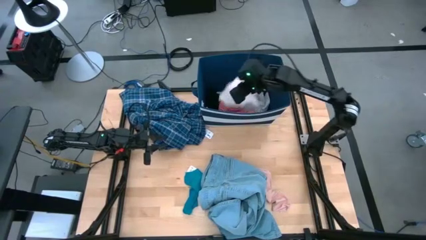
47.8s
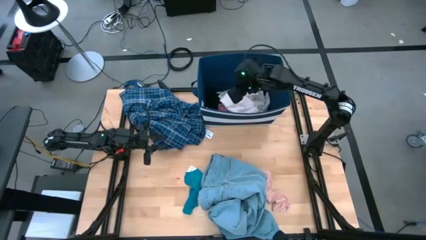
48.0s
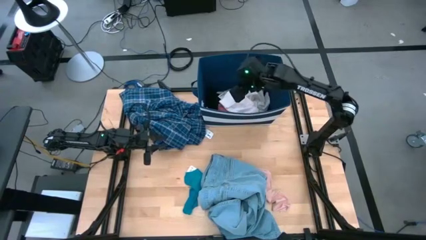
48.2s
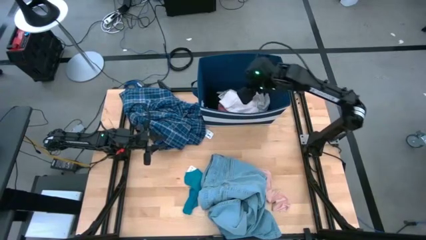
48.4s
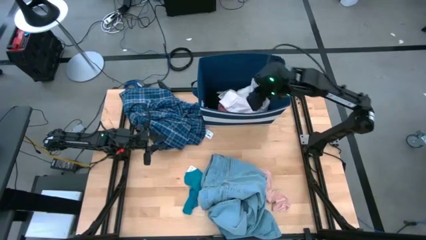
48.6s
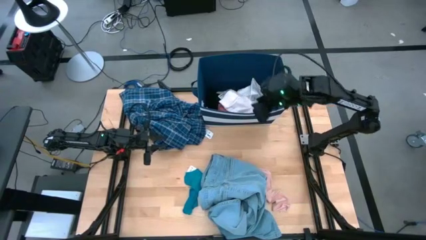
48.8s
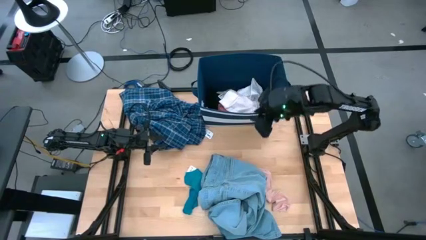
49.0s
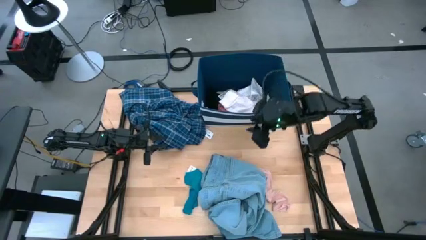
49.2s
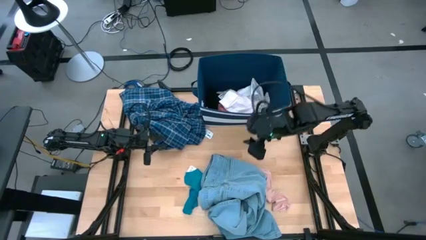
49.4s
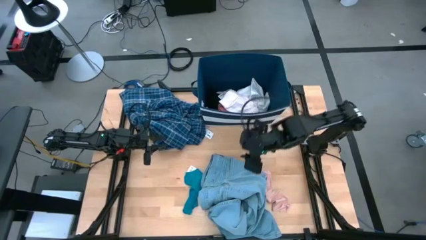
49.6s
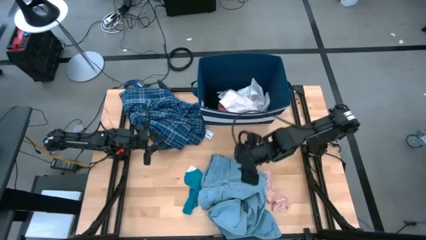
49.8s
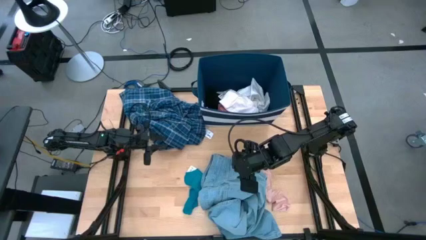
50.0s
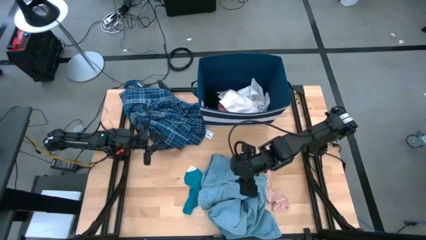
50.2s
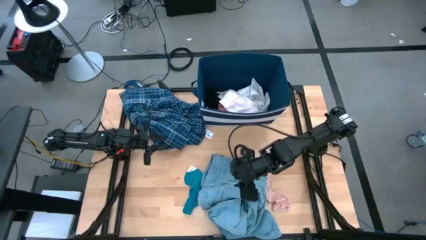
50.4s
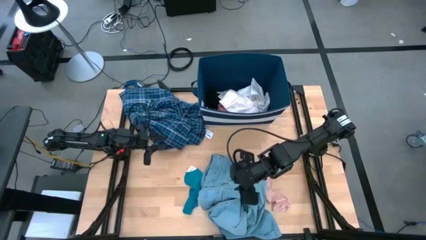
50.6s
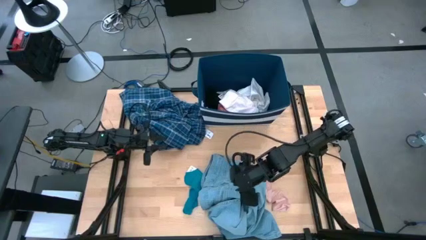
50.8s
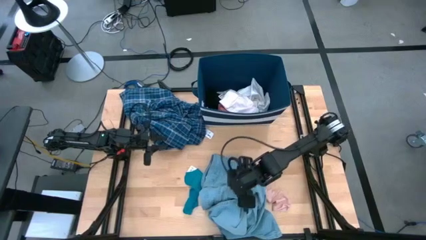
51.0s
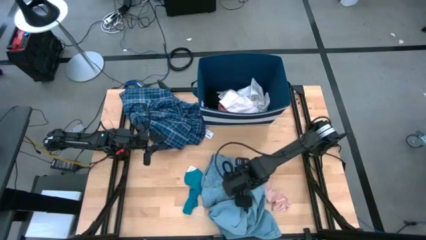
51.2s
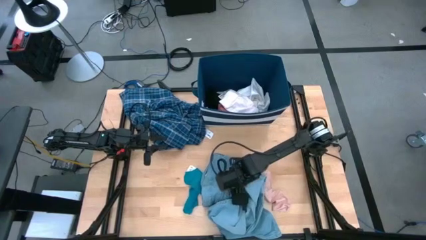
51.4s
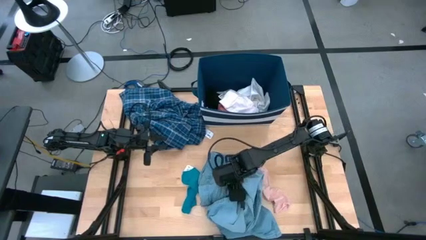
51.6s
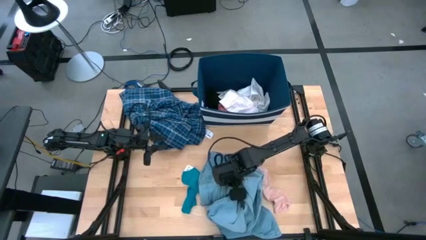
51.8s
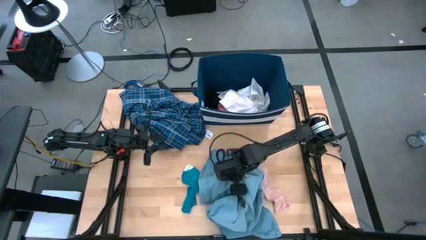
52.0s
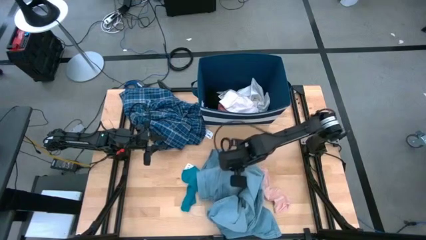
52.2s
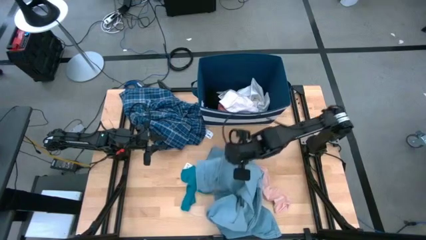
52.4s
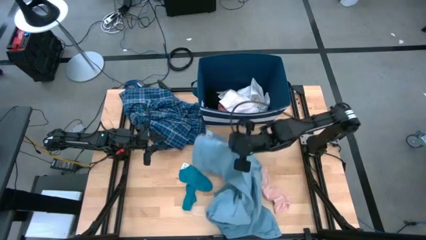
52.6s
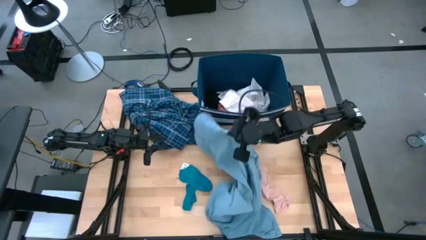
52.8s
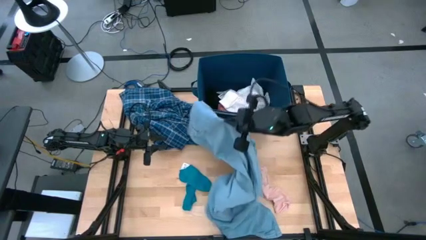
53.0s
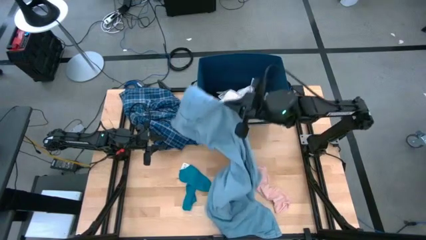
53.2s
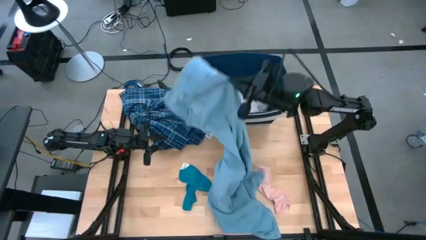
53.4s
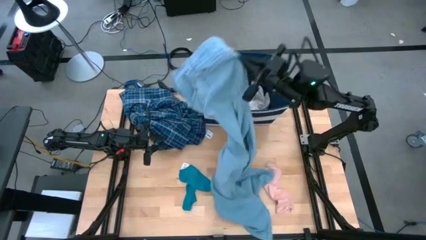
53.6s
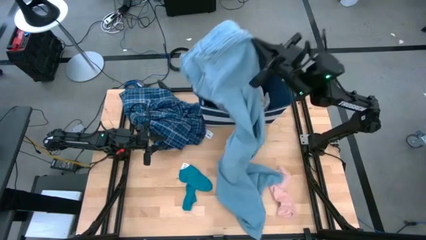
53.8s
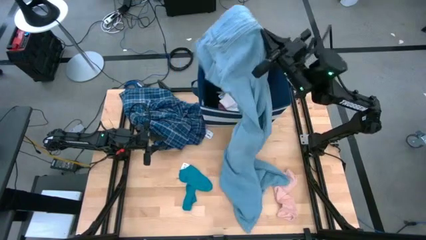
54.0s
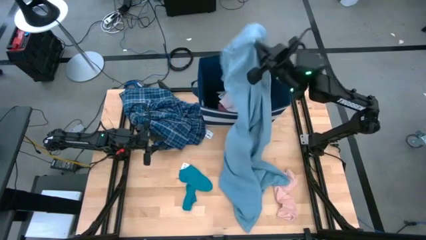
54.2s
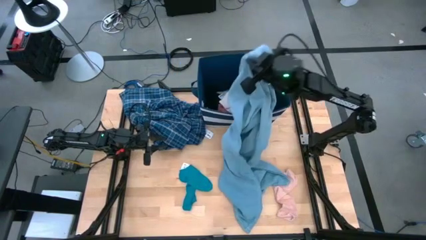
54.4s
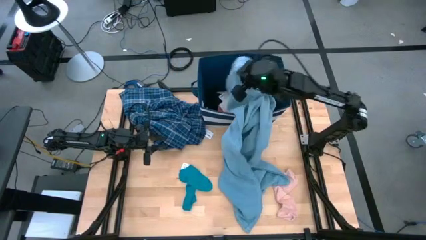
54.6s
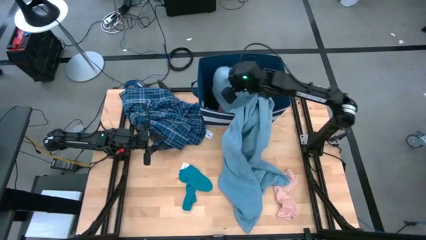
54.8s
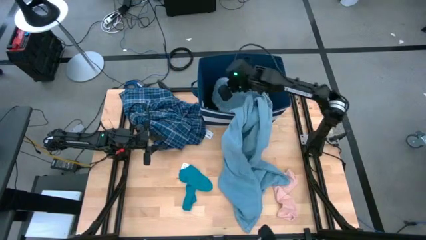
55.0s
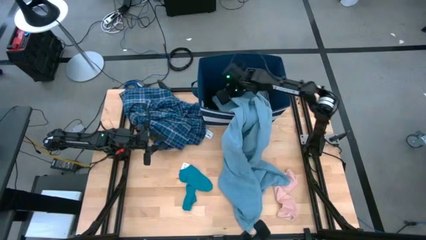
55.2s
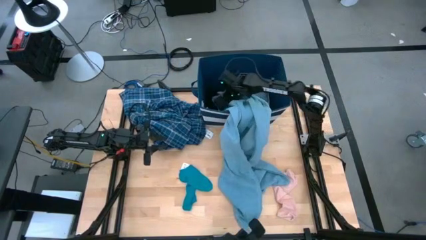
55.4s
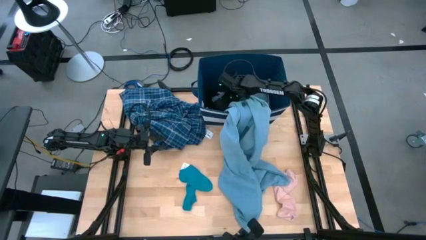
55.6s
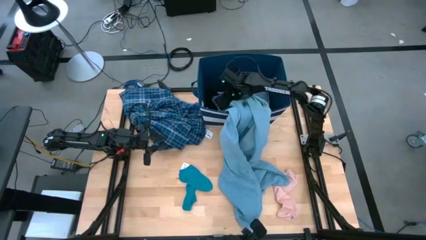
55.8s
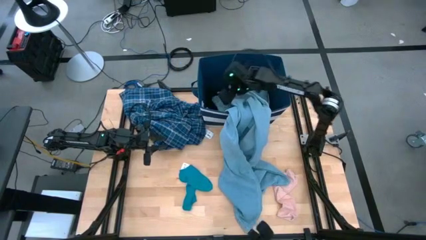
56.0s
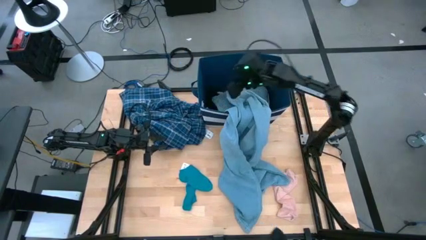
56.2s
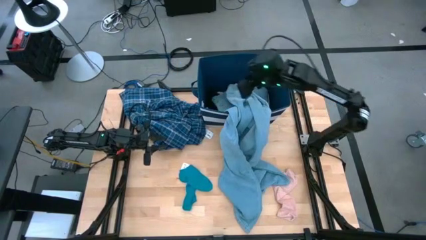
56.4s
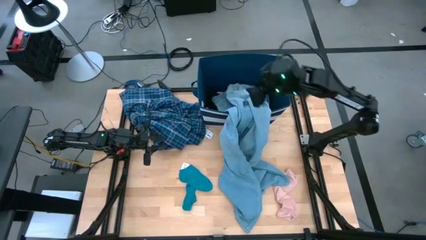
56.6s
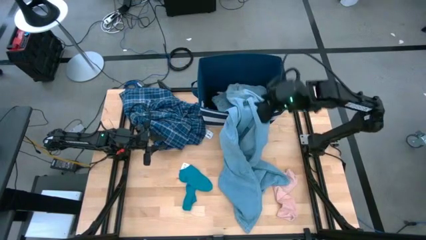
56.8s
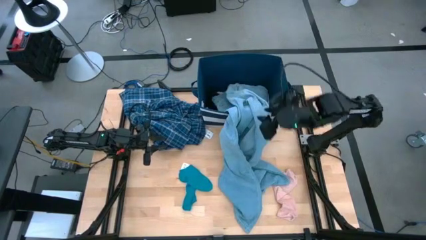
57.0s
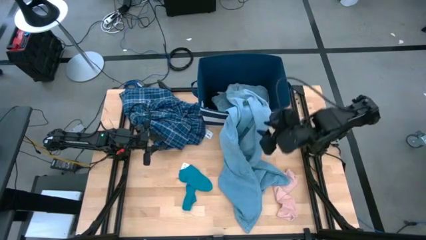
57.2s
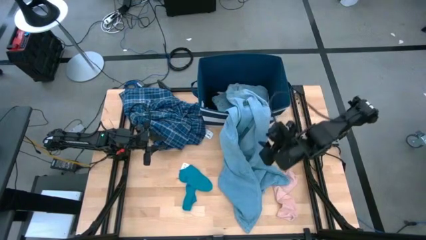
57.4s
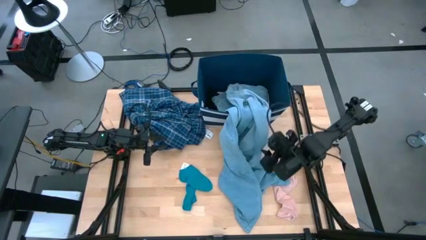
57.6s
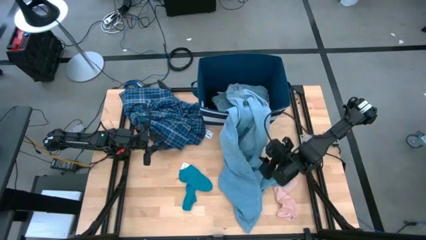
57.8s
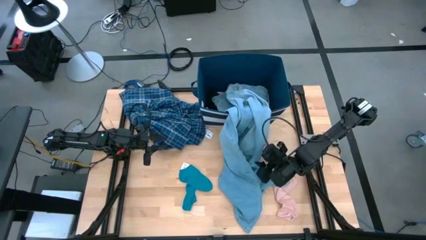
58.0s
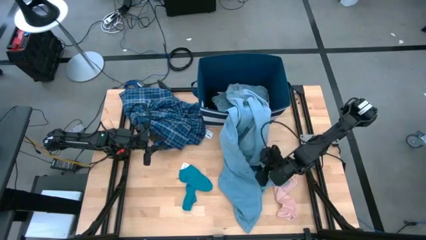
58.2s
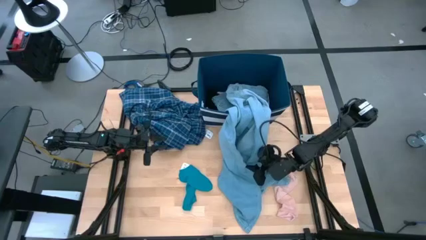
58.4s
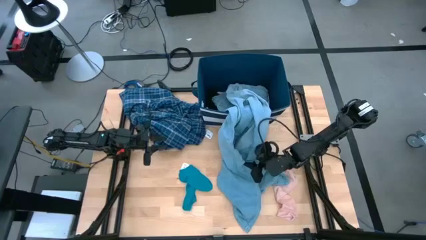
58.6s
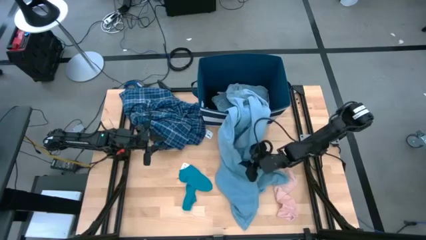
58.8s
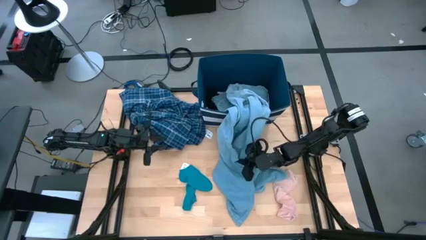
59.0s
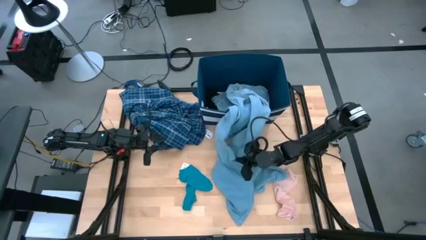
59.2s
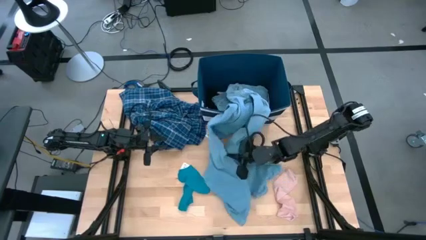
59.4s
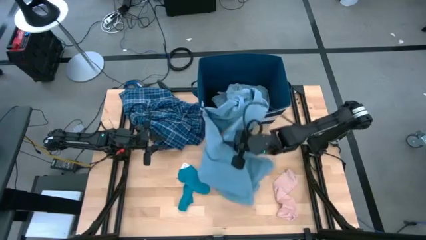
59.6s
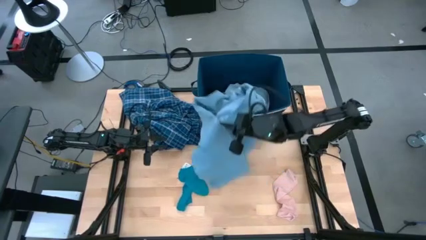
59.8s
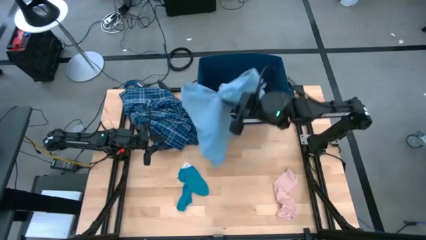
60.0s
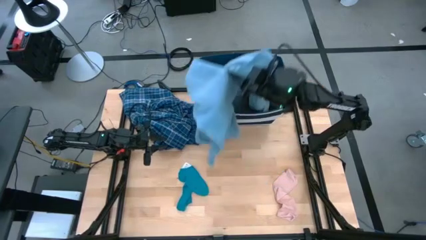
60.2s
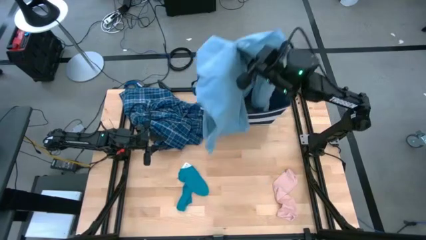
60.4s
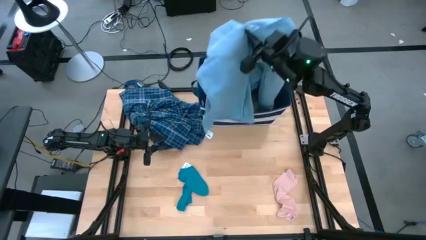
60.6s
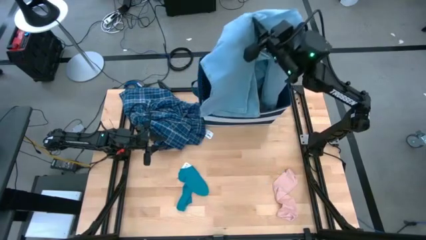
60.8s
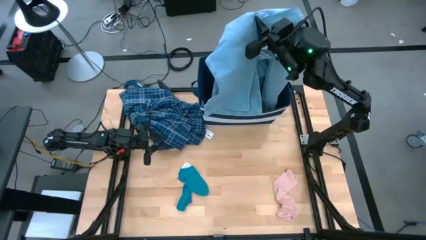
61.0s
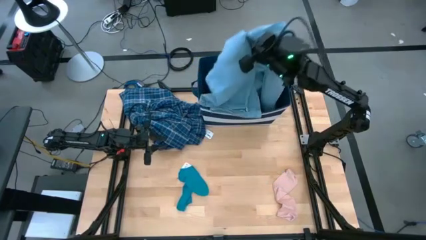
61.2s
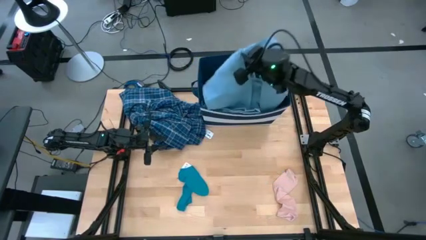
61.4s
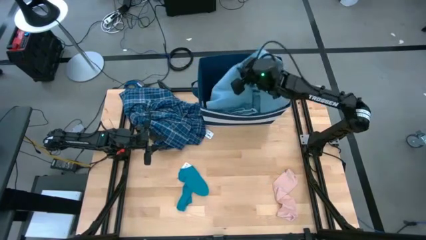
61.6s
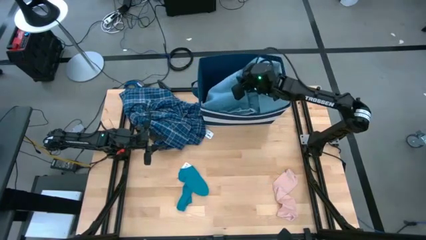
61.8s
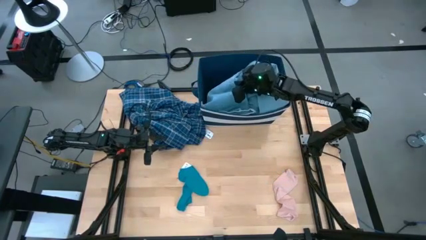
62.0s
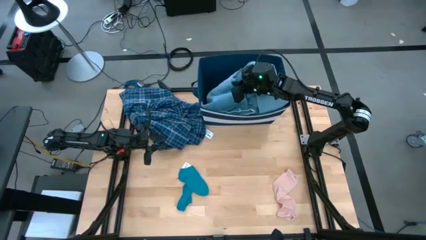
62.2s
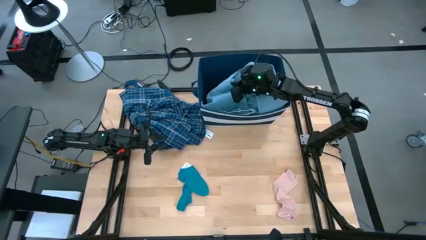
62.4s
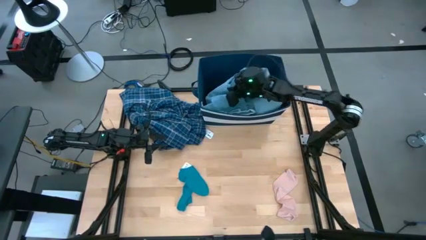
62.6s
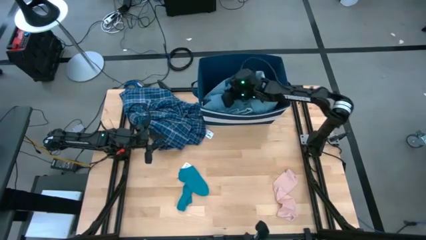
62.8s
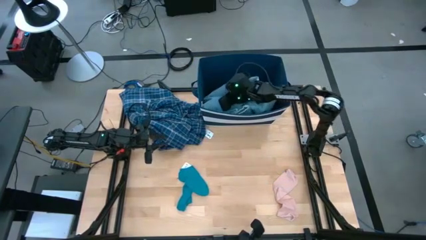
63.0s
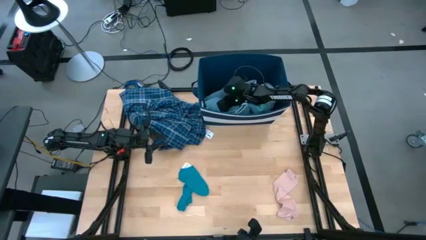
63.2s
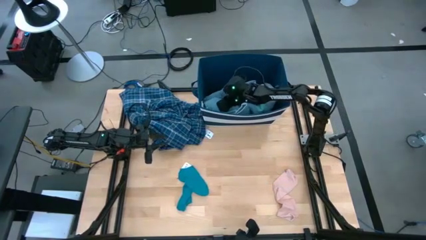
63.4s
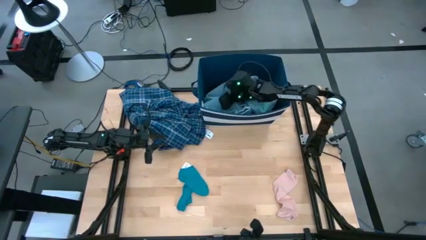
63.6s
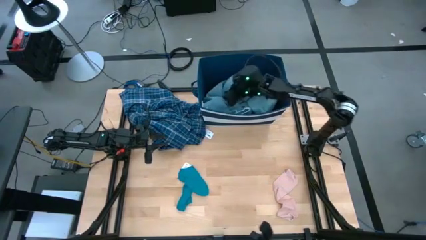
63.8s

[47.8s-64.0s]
Task: Sort clothes
Put the blue jeans into the blue laundry bin
